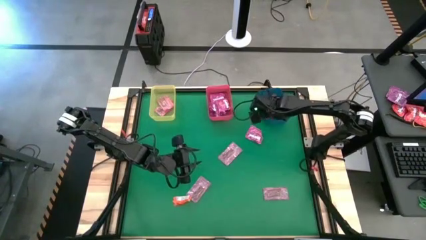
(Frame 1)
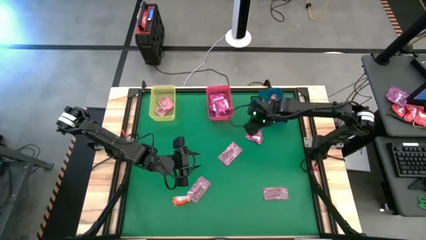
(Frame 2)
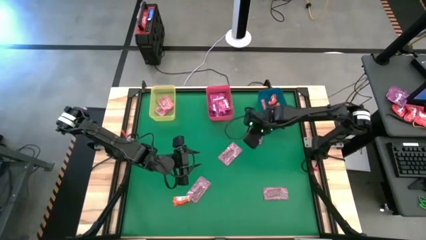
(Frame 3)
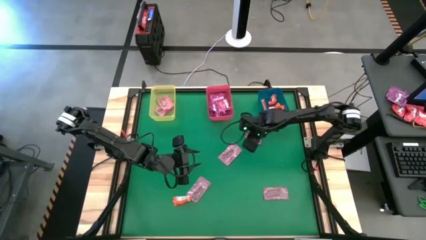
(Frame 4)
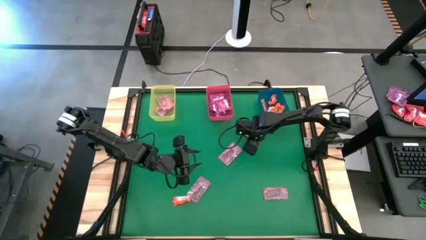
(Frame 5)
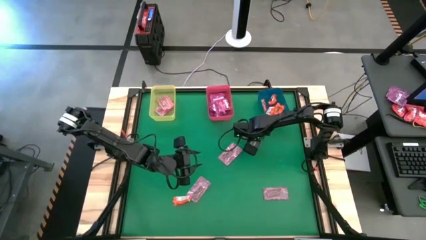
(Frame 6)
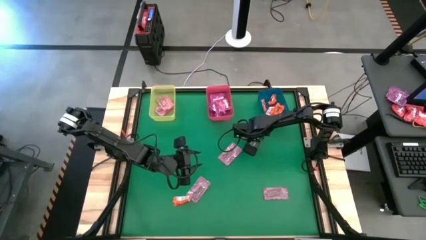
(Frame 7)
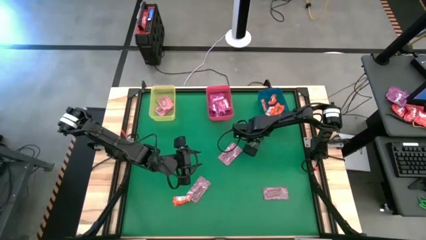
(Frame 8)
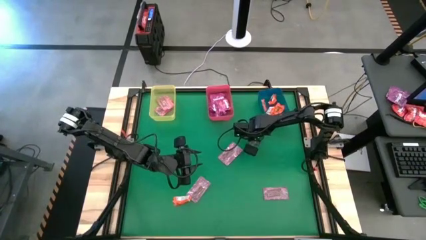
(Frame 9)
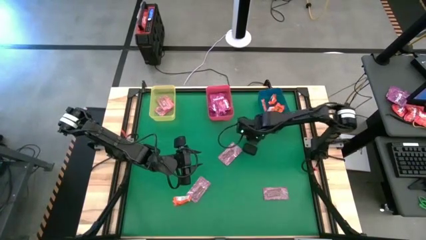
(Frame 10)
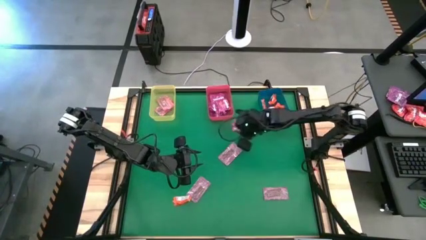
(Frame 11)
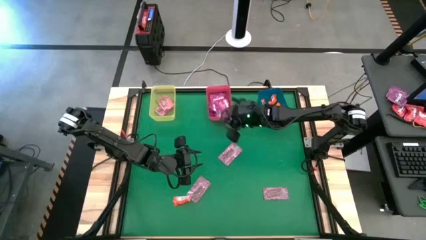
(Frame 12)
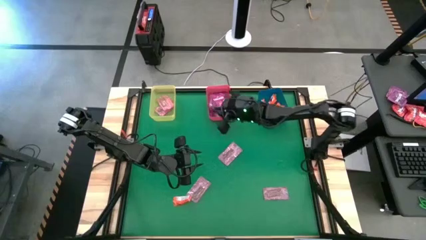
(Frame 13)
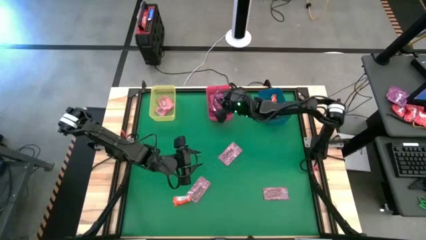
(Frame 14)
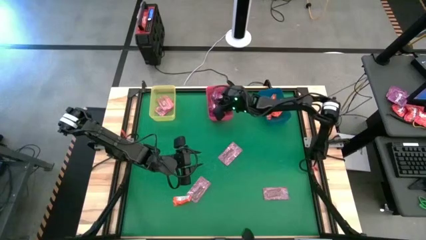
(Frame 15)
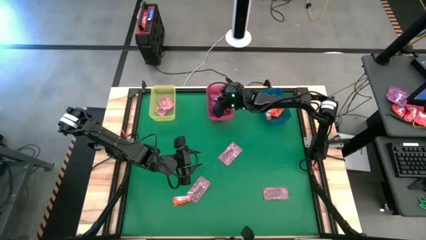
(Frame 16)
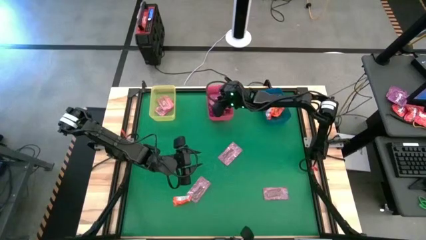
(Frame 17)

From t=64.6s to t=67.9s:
Task: Sort candy by brand, put in halloween buckets
Put the violet candy into the pink bin

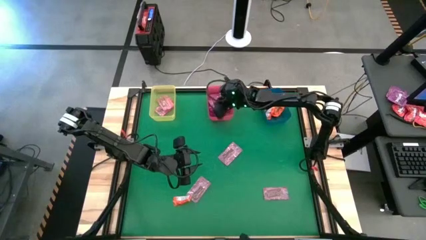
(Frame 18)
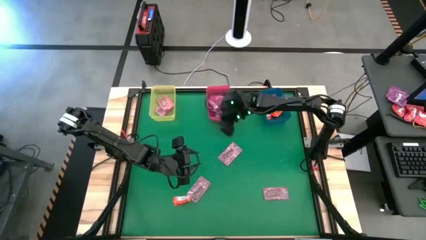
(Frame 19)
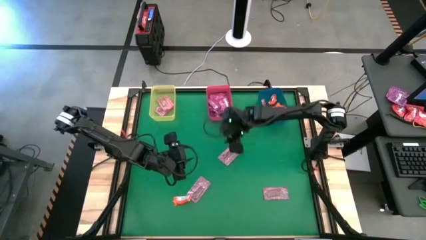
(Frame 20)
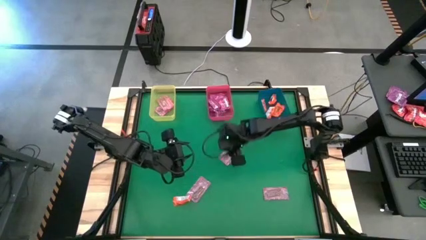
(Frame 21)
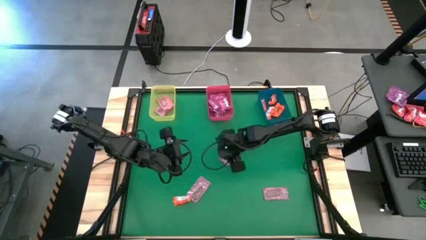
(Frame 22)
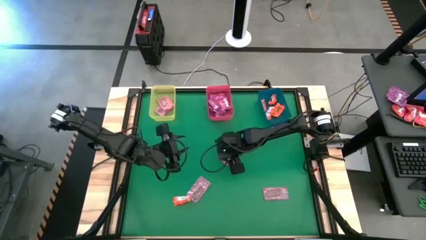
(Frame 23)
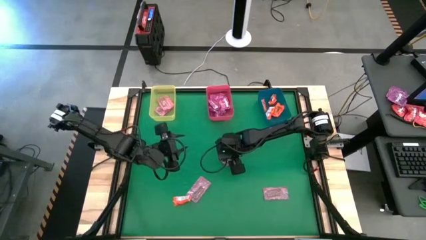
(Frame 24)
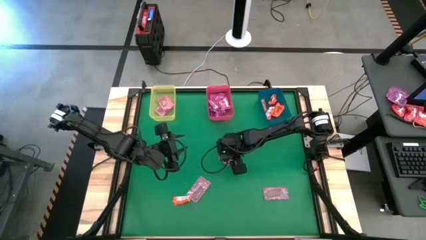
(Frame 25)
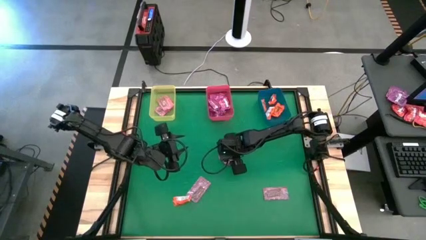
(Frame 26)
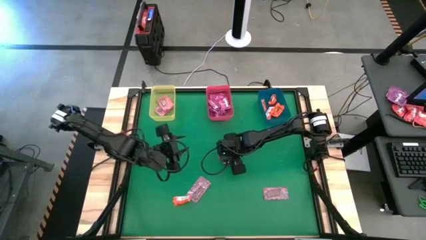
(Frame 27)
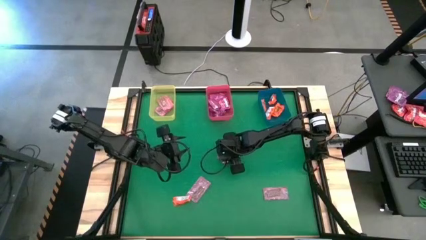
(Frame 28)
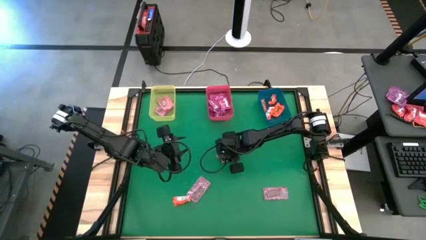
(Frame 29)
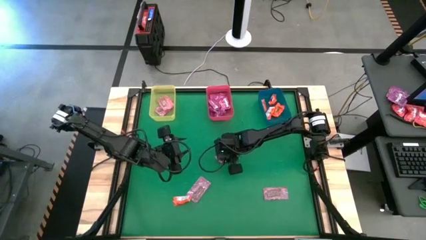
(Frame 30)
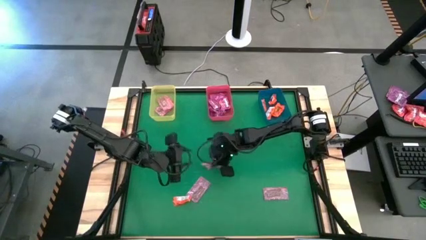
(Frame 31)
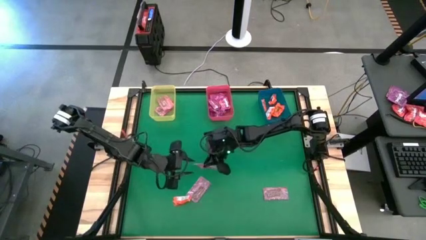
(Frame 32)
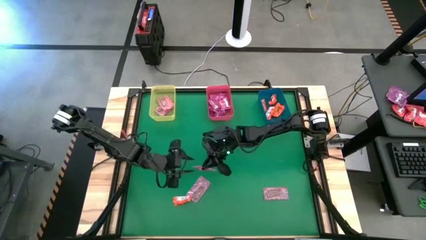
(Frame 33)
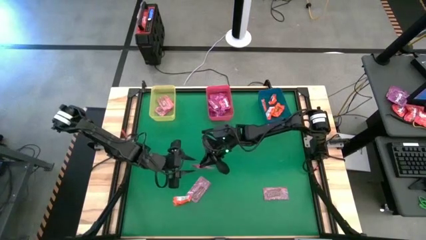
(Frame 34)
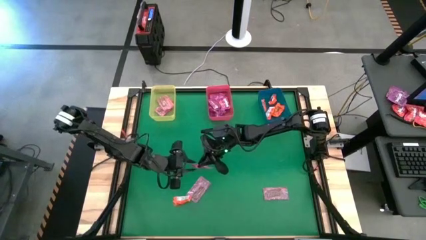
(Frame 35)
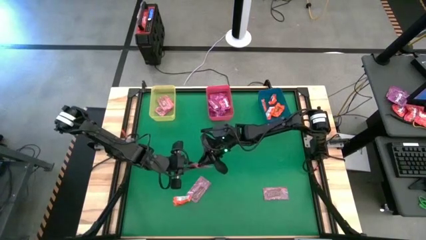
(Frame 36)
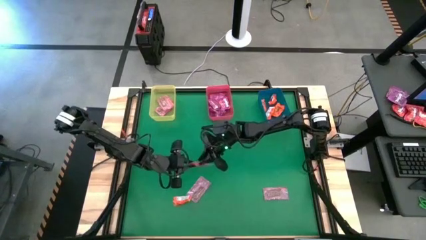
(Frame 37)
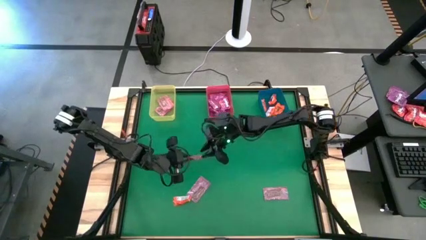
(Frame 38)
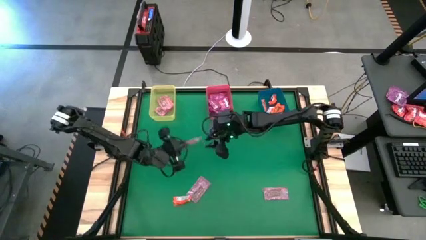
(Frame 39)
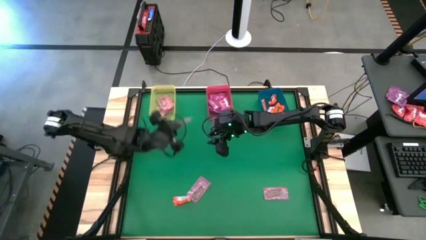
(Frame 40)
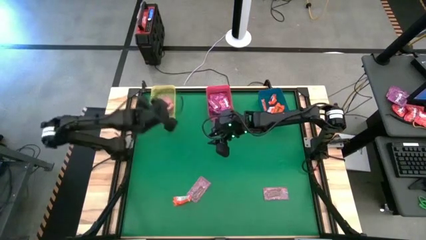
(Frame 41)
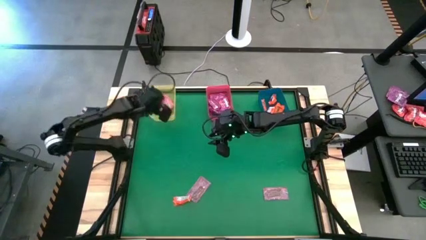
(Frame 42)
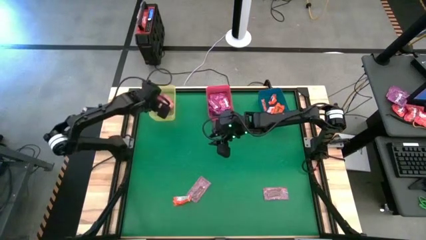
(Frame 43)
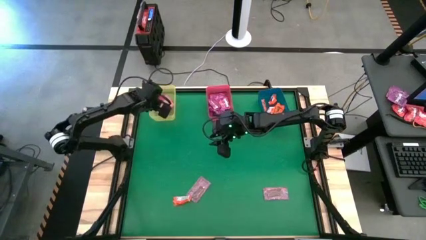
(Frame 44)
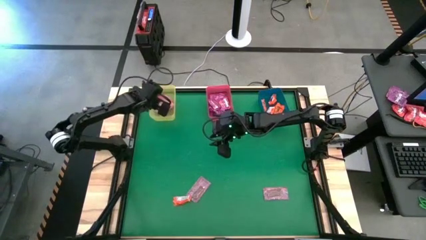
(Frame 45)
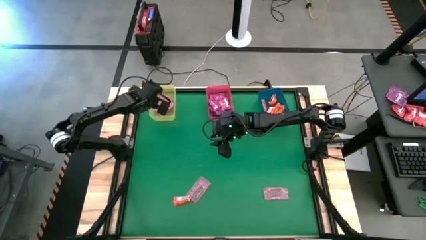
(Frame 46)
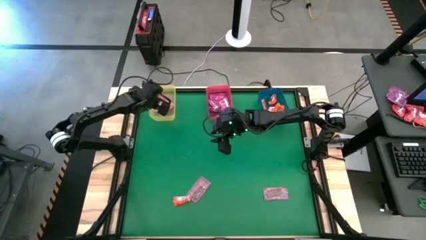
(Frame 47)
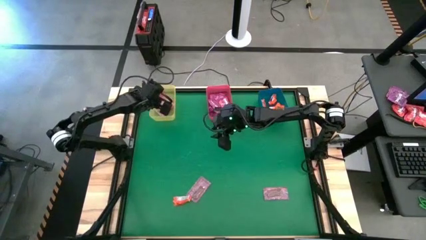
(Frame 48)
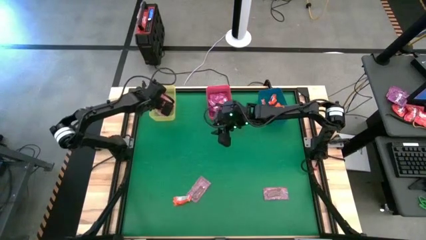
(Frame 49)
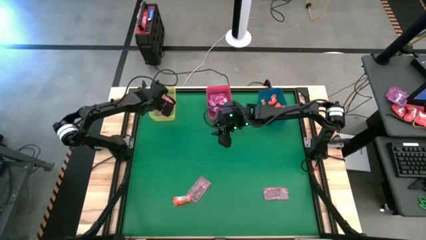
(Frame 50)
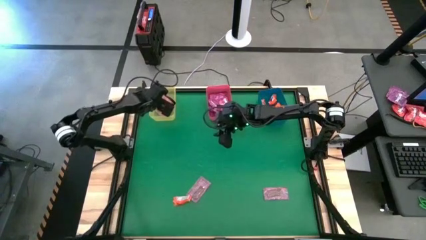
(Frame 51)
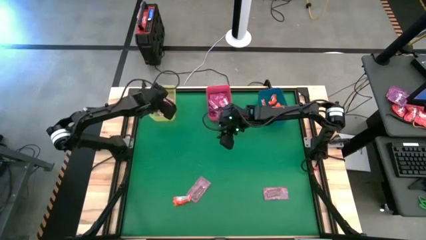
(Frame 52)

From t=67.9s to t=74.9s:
Put the pink candy into the yellow bin

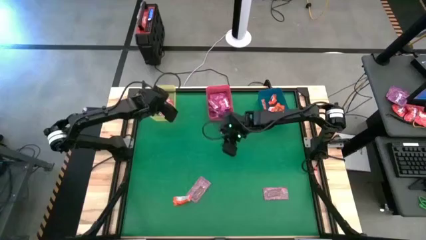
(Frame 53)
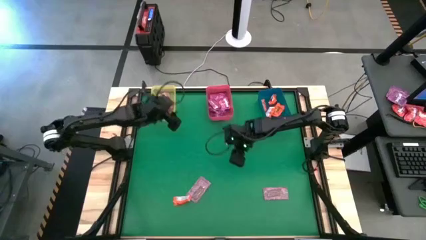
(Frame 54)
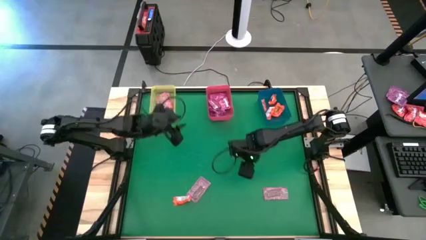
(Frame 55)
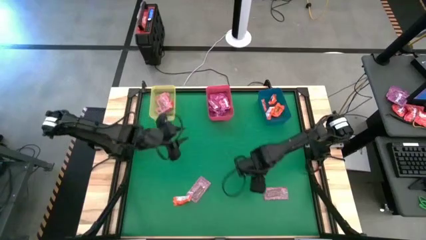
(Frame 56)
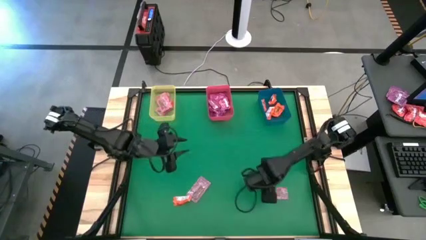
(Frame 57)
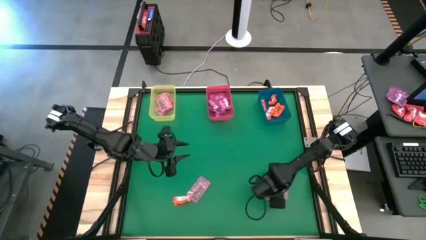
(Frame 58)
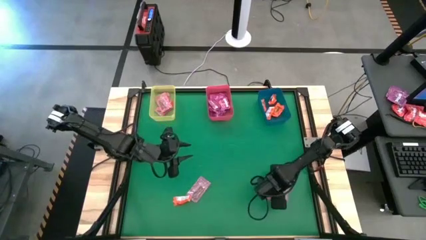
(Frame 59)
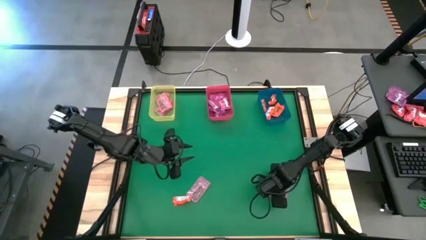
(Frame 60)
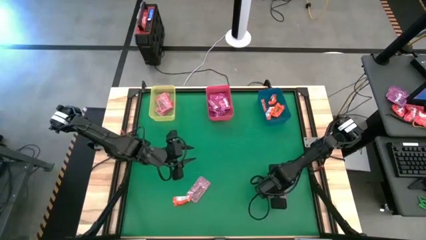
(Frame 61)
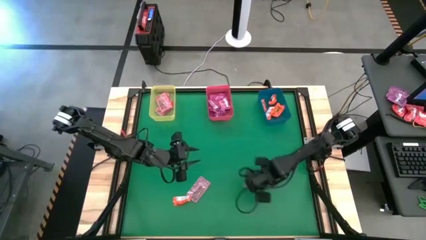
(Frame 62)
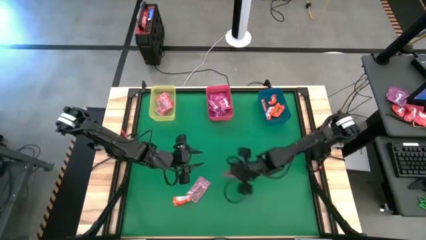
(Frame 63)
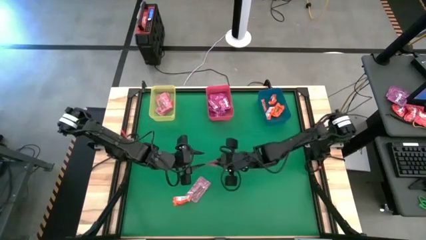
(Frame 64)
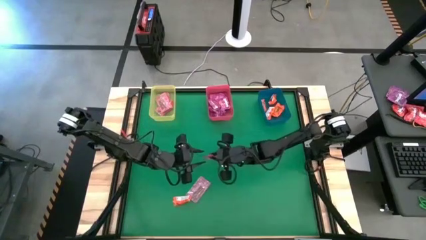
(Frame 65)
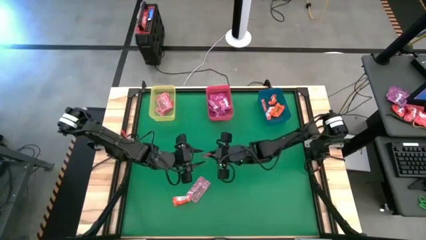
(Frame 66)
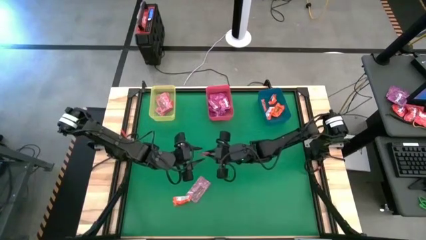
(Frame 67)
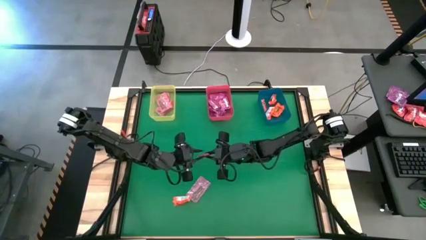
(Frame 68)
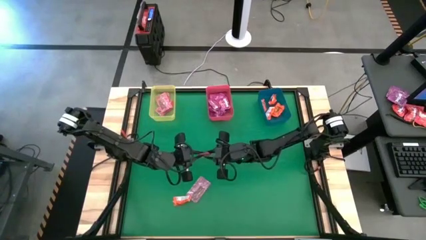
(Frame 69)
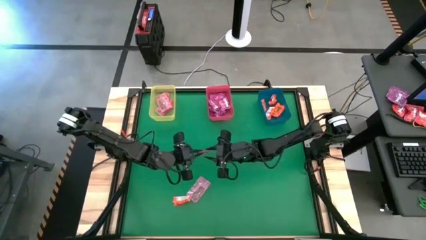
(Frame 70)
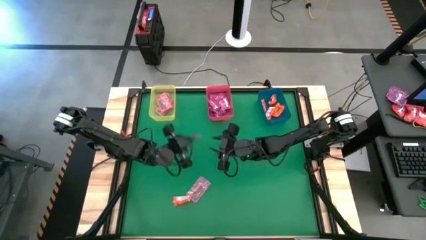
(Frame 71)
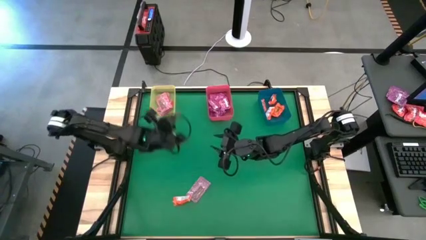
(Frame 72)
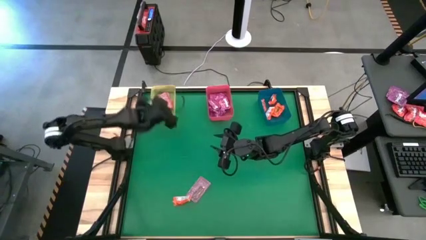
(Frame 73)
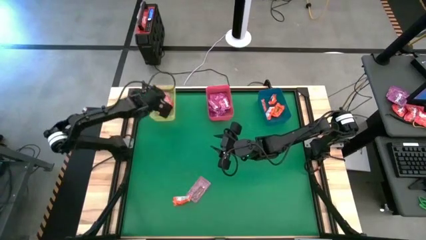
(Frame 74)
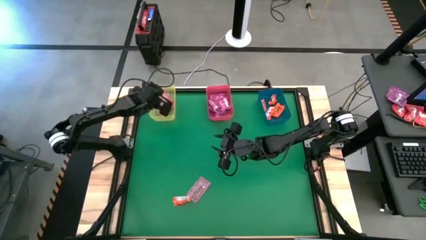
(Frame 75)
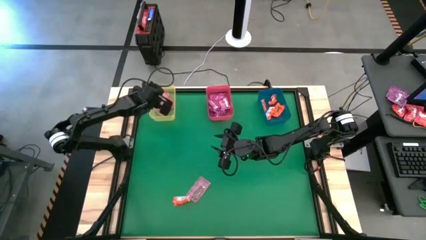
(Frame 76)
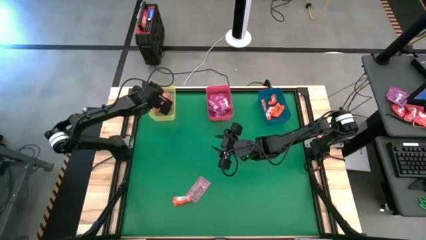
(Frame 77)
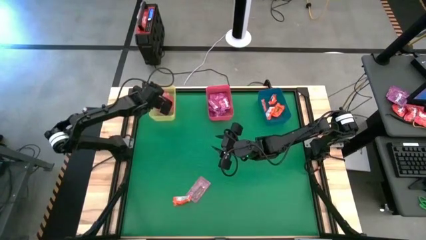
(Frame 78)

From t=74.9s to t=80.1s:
Put the pink candy into the yellow bin

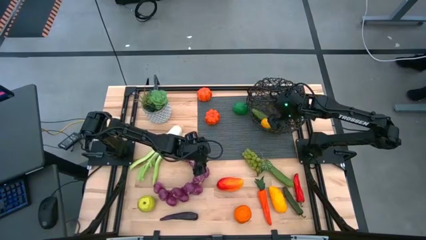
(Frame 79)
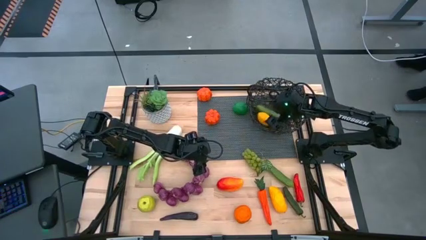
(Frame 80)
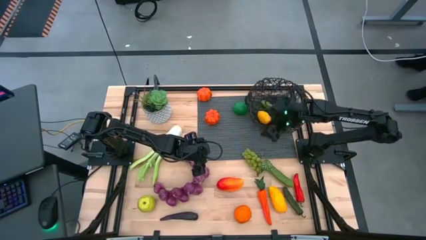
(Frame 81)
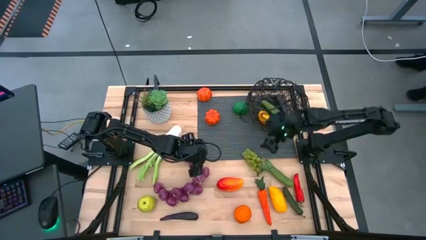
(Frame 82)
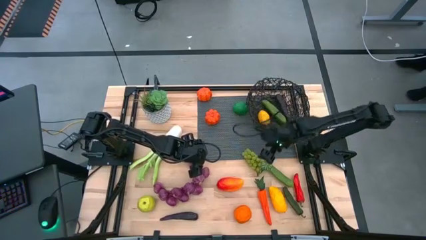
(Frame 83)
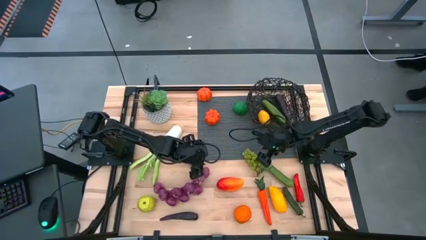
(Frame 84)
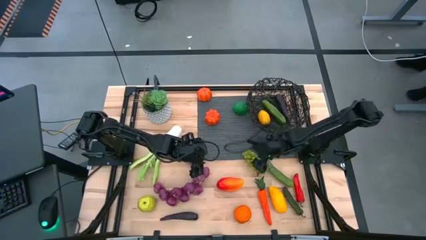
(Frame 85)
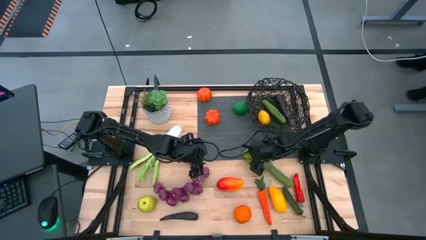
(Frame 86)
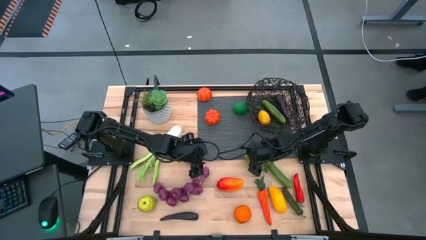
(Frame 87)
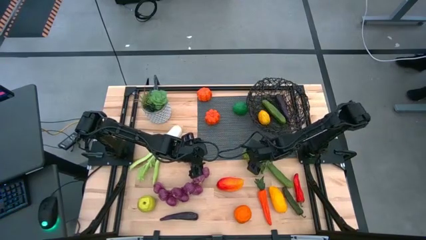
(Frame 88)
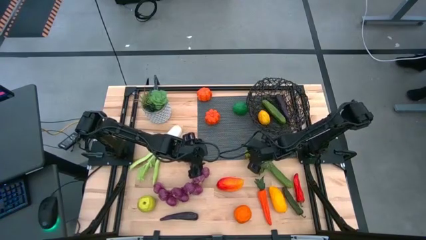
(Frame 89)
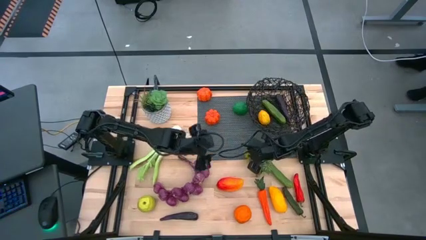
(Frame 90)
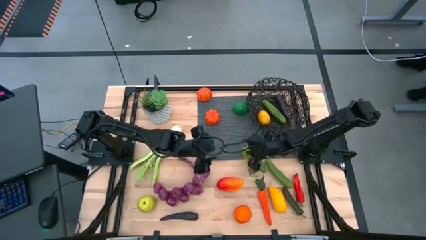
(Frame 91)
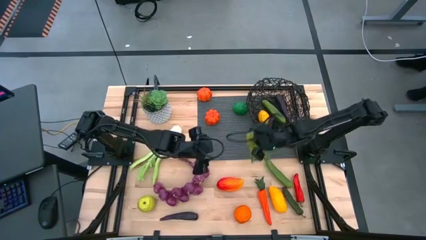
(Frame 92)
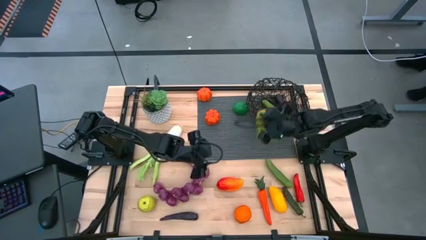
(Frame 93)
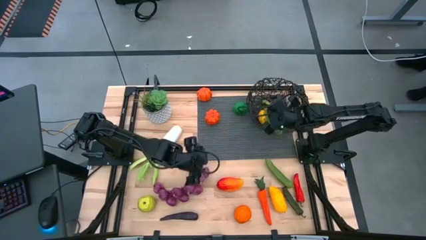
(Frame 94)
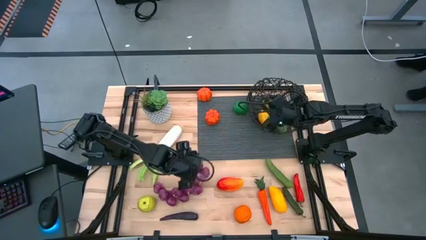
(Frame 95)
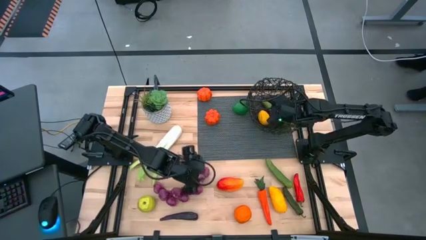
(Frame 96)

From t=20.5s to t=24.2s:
Task: Build produce basket
Put the green grapes into the black basket
